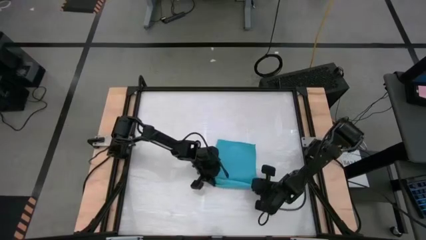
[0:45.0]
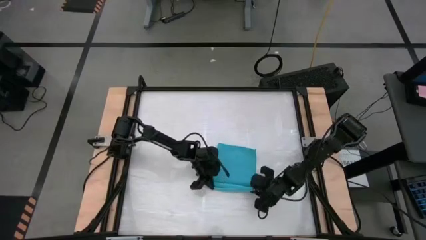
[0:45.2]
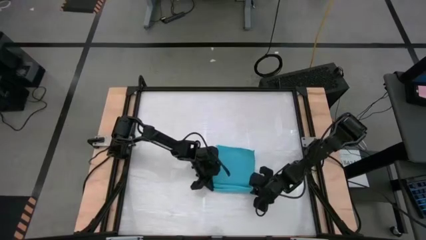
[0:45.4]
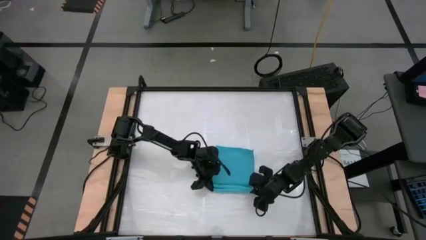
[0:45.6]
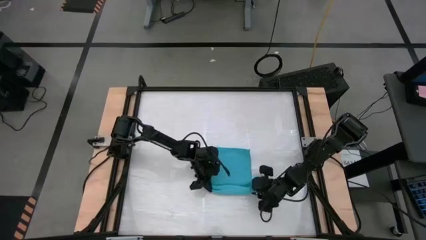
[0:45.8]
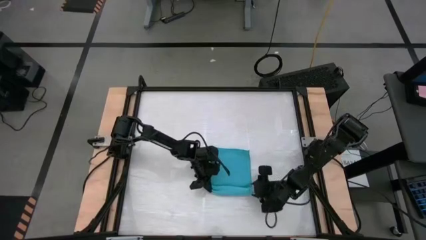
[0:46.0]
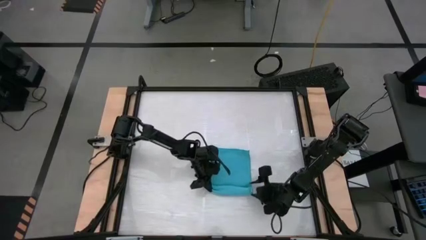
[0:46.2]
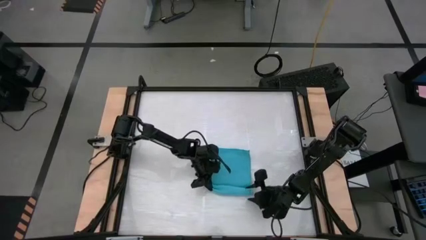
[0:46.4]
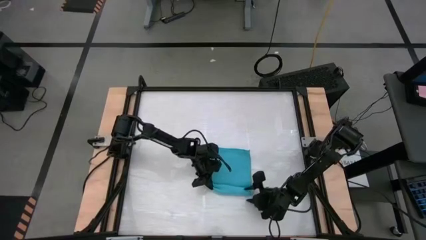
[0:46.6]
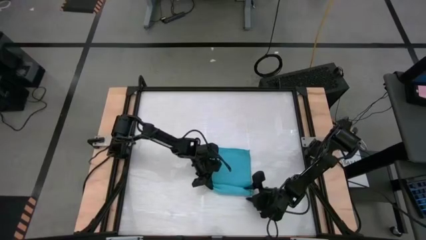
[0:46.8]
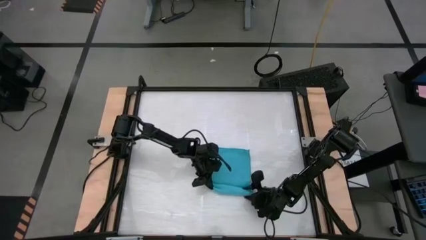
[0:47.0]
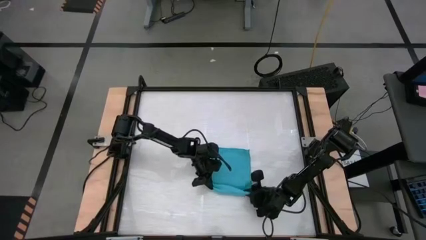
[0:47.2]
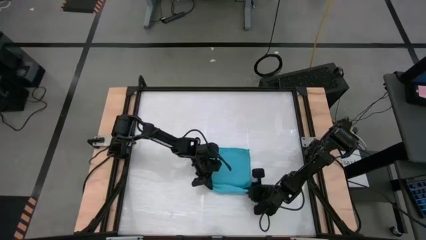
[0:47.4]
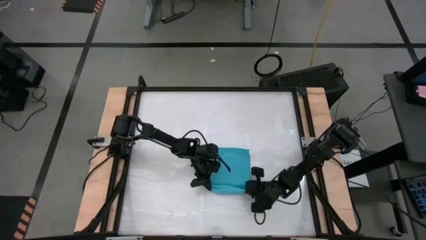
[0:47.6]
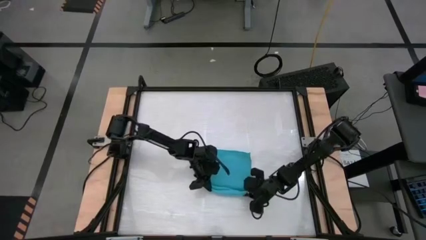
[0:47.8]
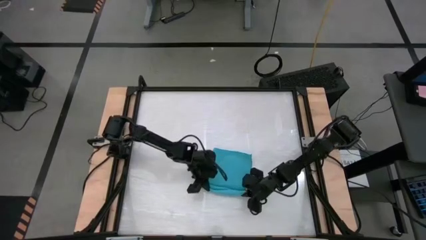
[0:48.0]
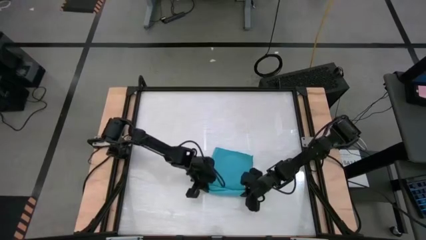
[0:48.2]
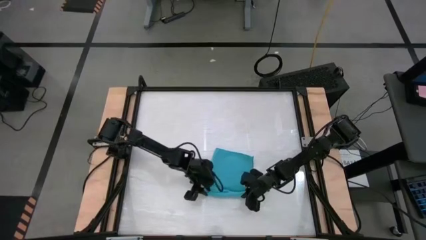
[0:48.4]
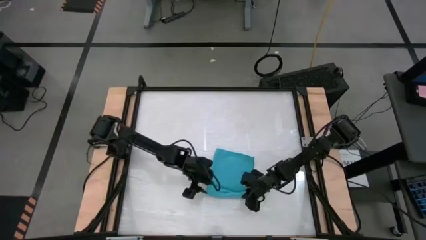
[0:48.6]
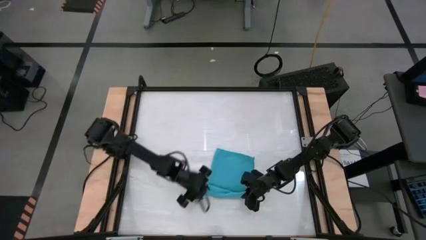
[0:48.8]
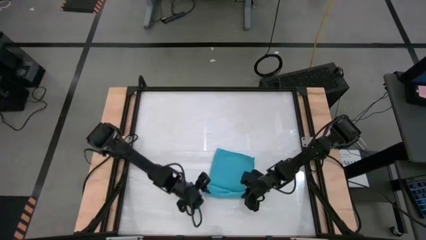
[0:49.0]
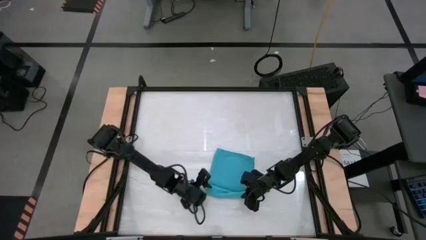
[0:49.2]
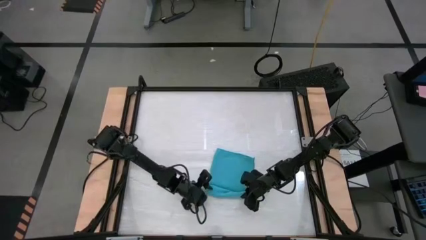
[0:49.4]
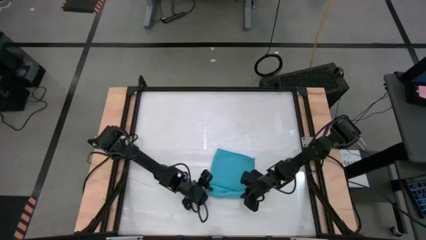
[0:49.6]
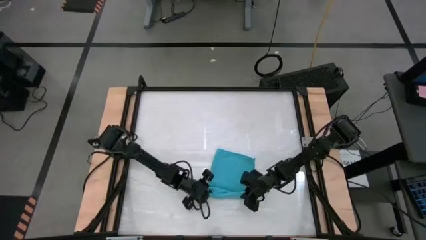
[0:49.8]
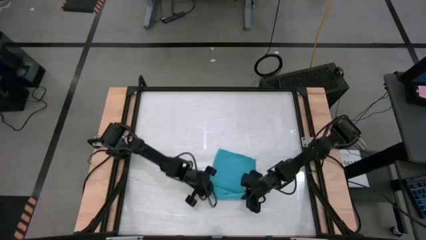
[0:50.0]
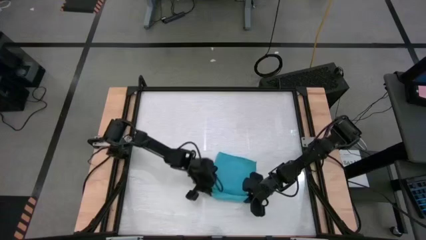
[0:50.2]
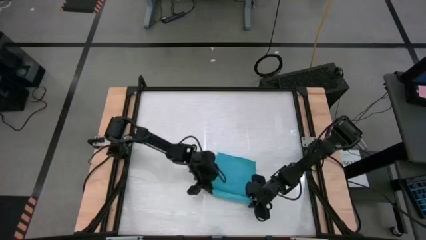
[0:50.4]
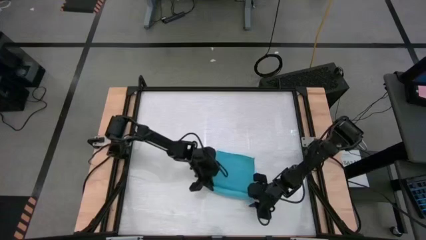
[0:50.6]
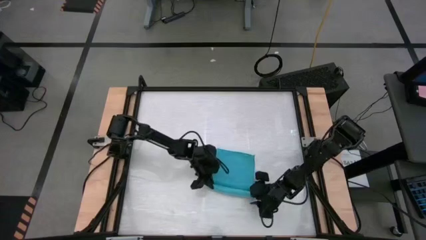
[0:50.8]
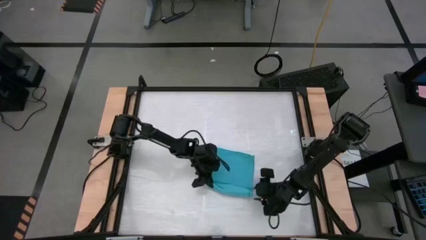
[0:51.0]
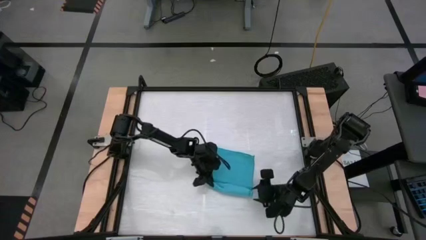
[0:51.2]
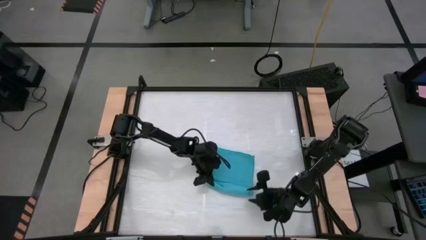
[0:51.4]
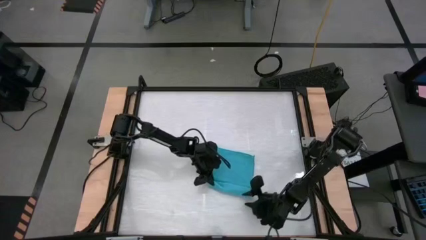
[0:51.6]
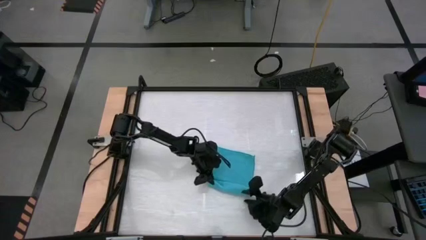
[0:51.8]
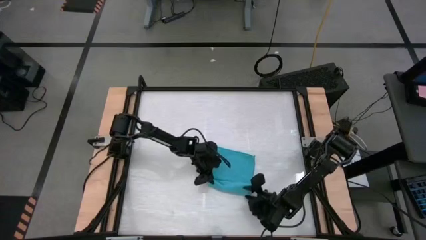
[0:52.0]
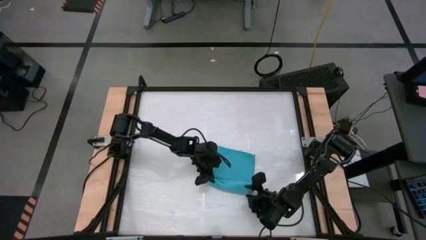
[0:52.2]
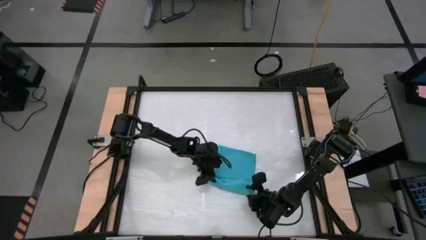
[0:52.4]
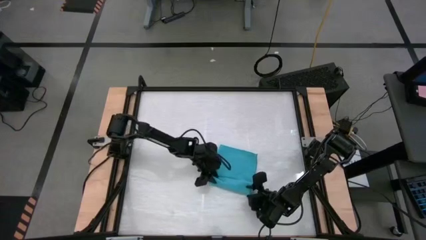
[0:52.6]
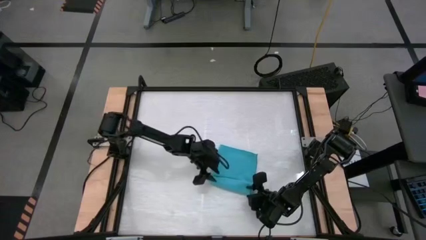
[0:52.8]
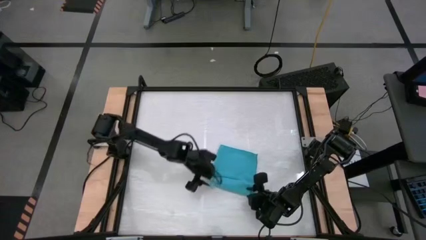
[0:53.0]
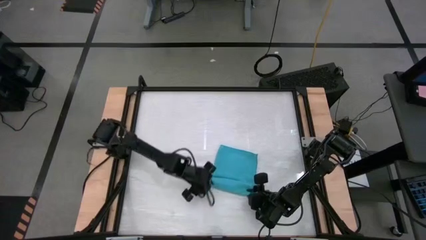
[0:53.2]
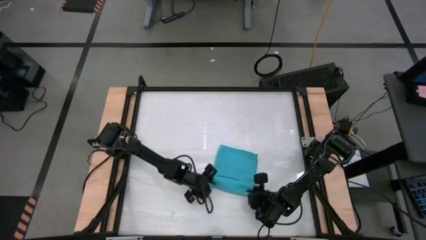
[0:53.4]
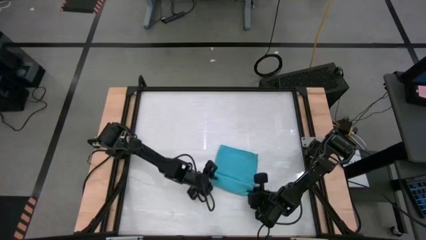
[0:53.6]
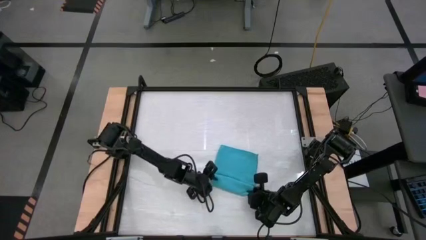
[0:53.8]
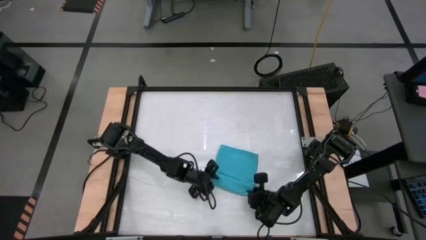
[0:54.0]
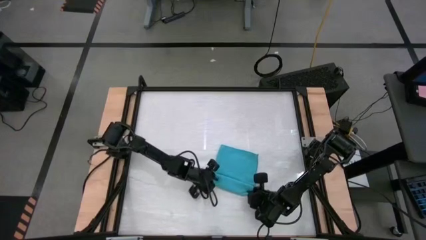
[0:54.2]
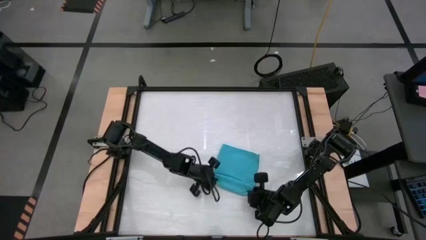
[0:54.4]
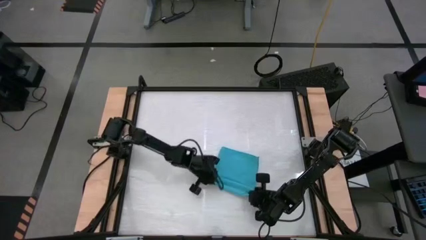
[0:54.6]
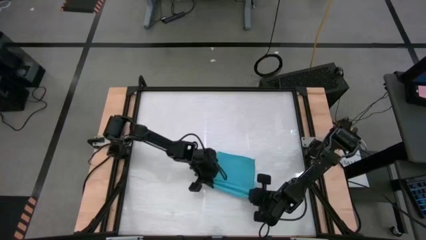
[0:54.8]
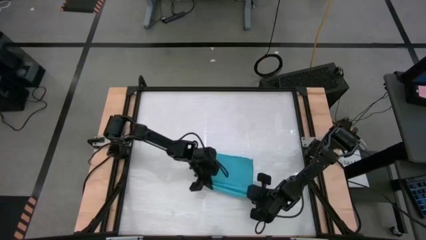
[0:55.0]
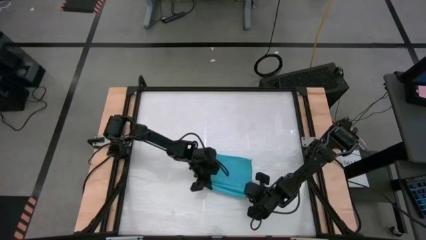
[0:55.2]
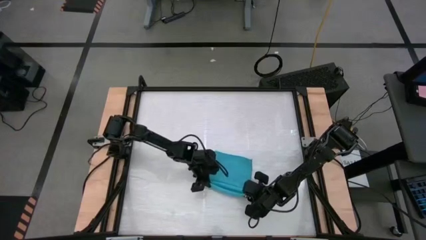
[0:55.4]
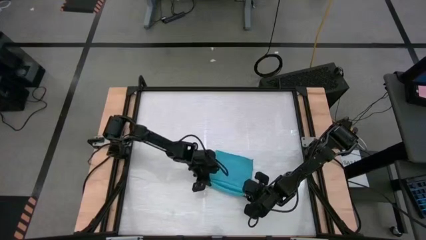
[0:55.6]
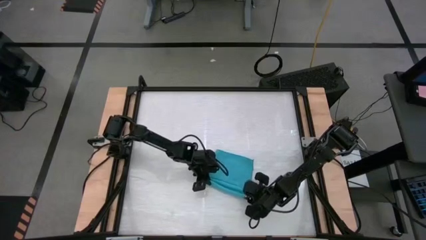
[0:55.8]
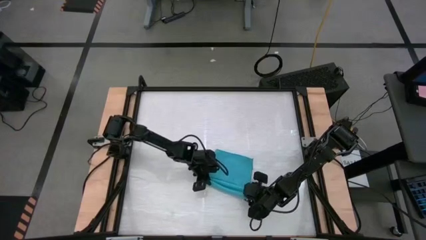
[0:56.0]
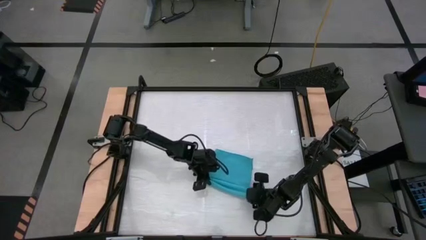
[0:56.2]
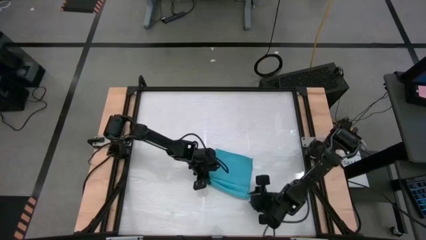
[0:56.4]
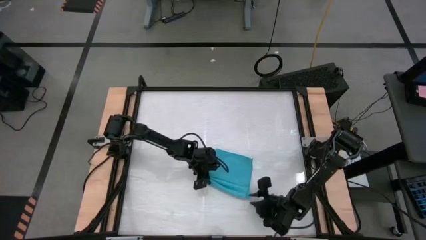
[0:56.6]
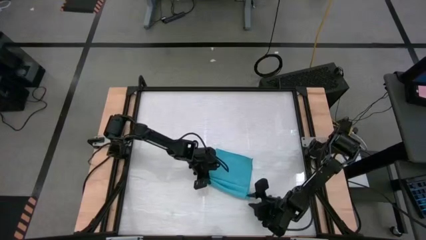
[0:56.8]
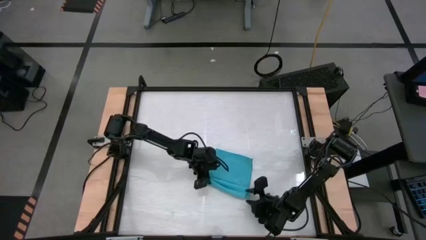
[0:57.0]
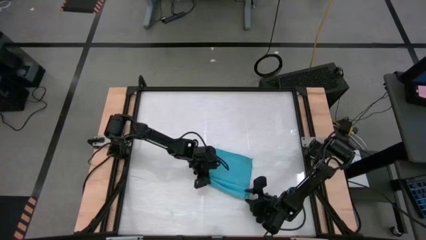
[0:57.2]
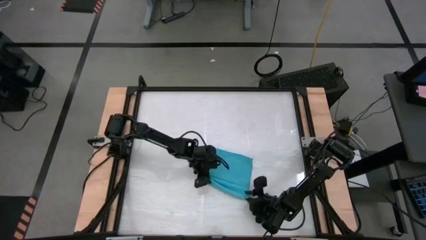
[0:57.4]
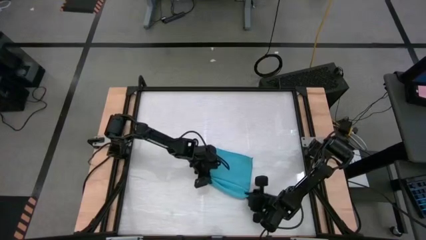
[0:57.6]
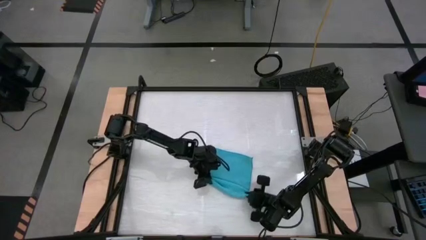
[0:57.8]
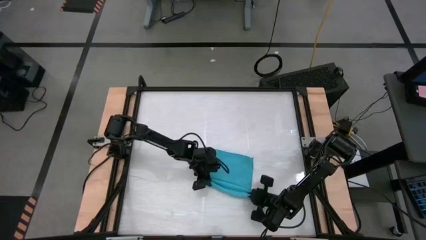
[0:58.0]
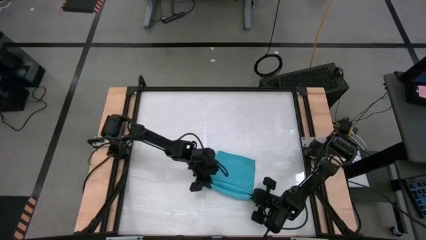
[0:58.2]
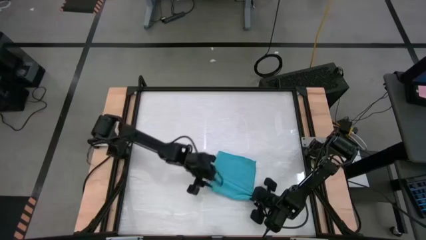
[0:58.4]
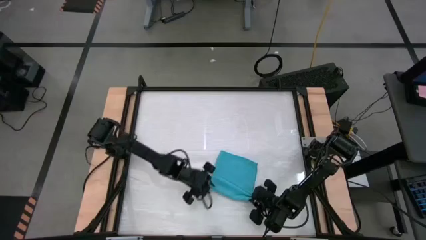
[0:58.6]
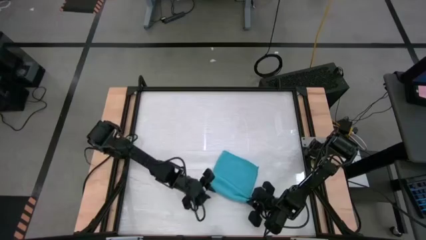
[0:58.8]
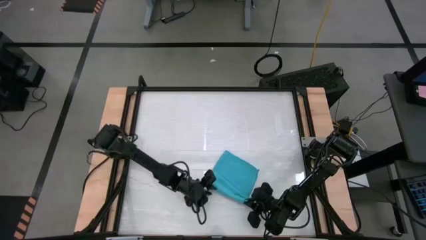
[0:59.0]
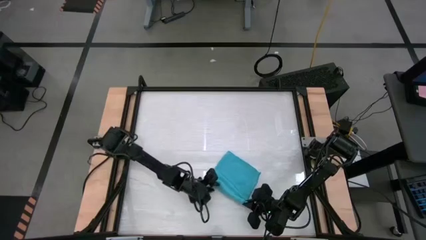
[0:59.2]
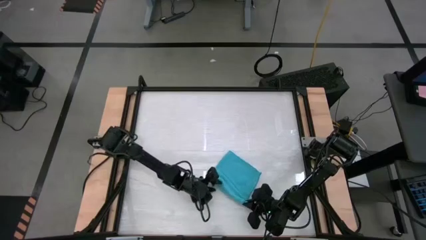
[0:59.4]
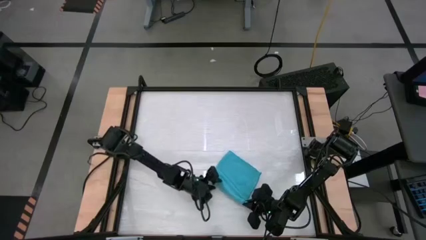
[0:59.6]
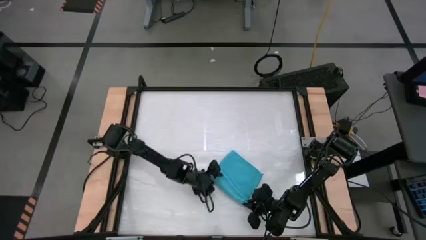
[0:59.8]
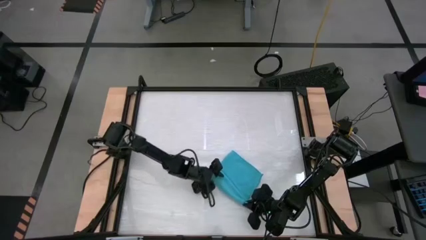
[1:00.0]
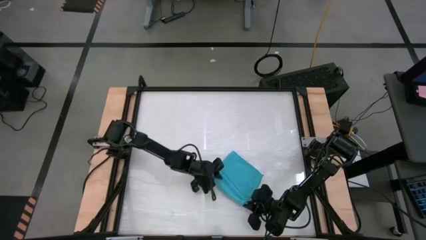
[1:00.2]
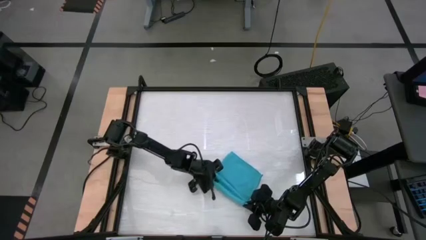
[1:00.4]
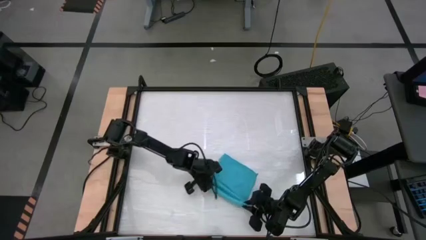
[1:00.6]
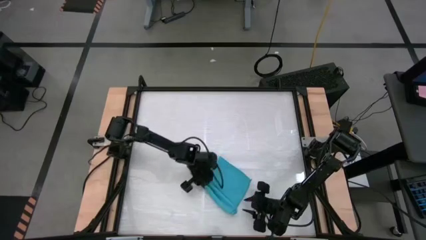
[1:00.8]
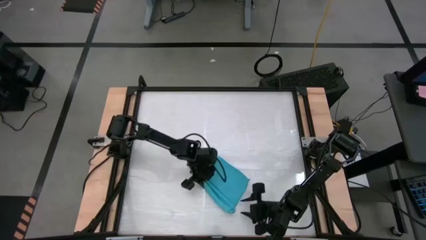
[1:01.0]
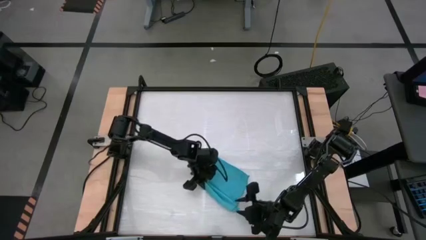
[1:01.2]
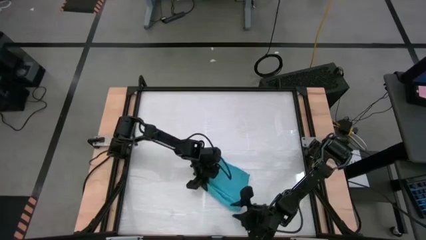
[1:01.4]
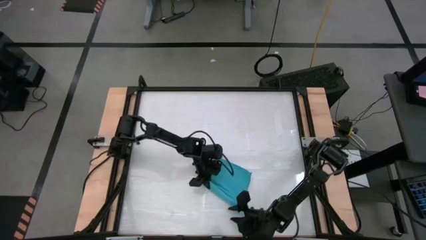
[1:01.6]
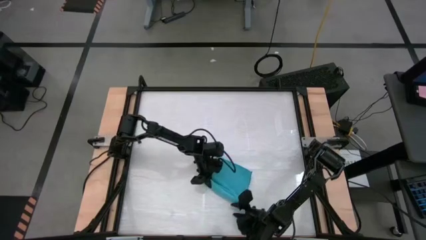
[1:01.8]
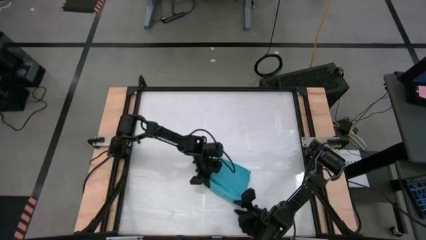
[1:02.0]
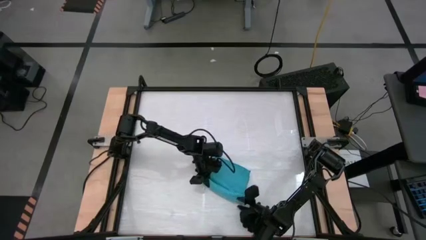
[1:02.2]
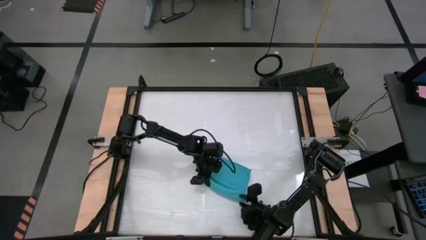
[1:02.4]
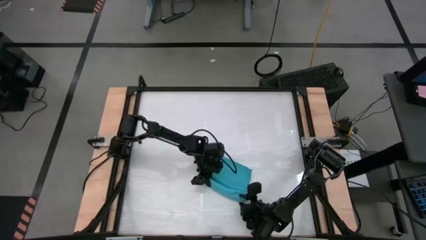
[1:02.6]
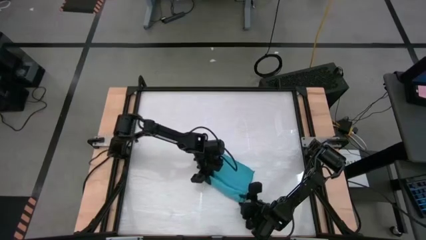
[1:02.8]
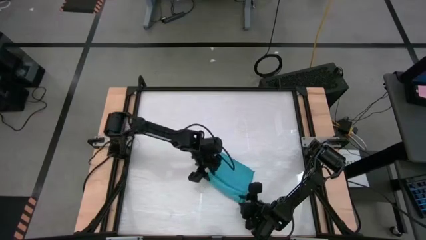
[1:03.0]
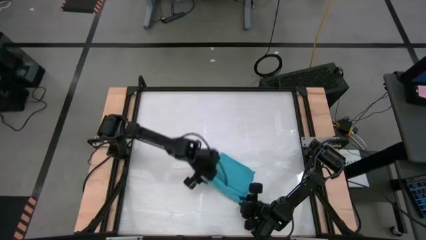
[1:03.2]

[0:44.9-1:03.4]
Task: Roll towel
Roll the blue towel
